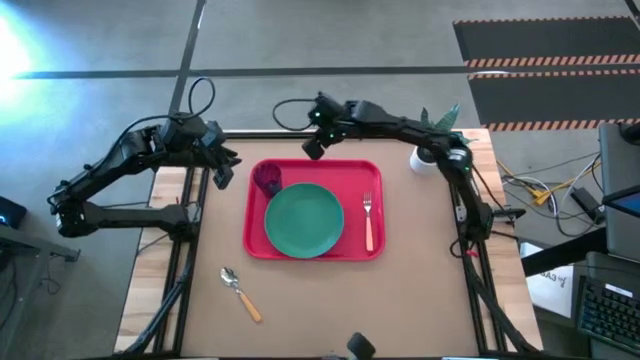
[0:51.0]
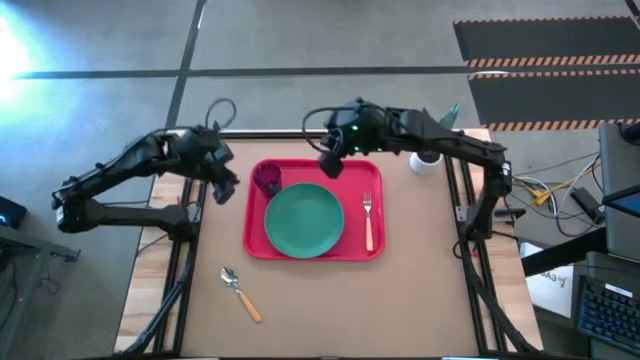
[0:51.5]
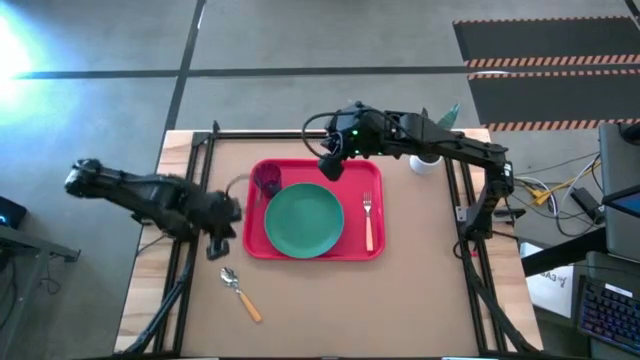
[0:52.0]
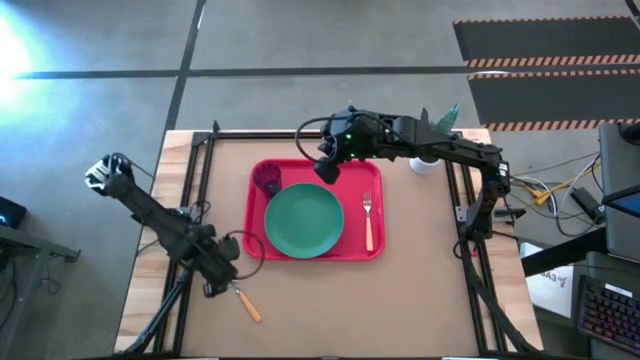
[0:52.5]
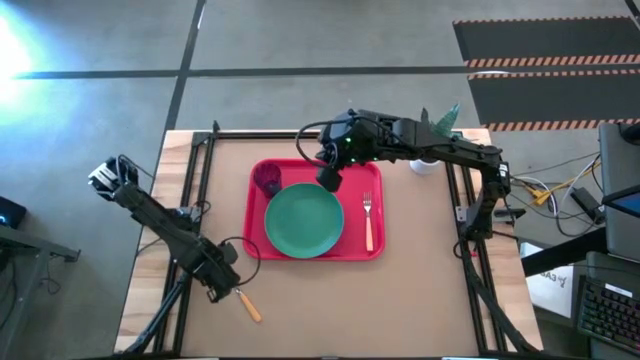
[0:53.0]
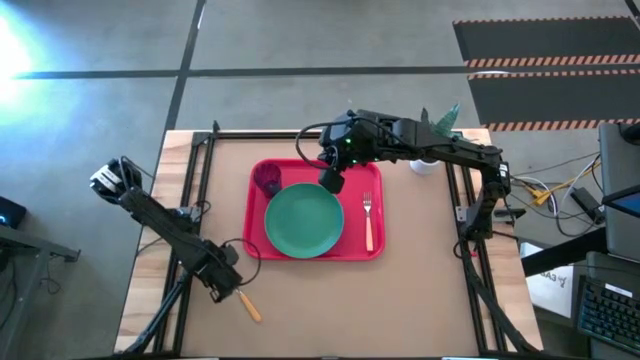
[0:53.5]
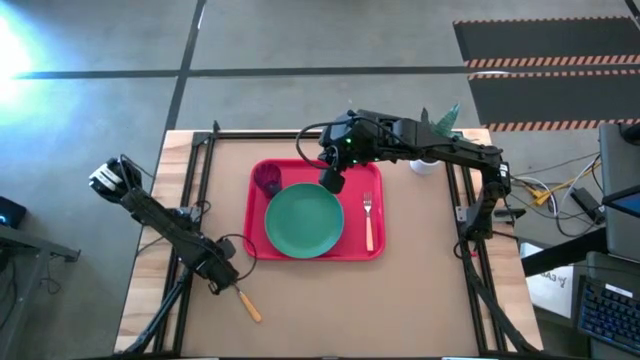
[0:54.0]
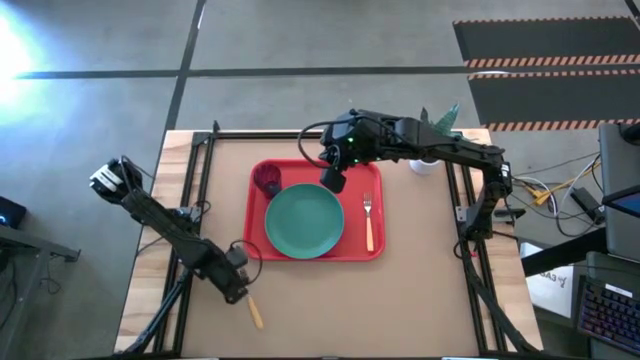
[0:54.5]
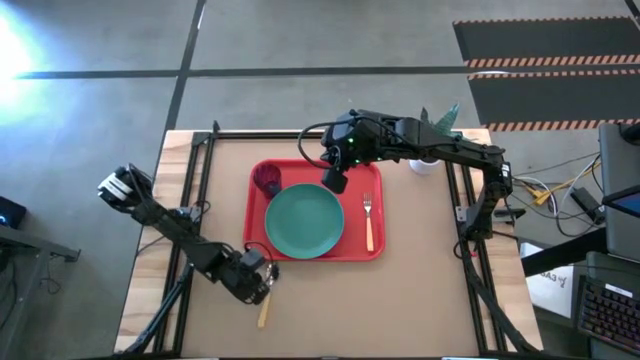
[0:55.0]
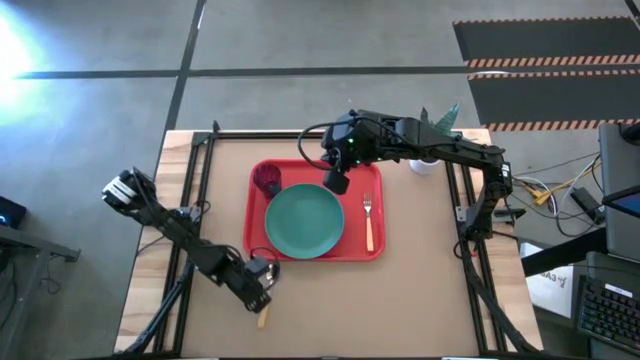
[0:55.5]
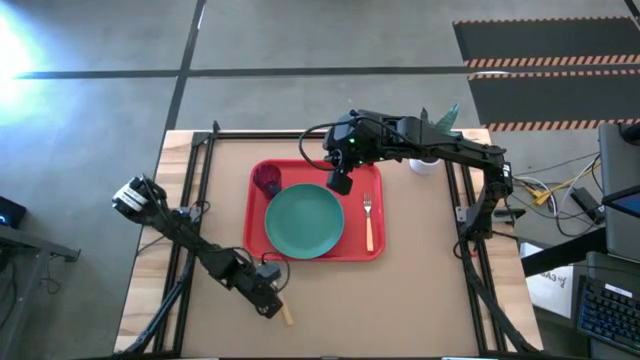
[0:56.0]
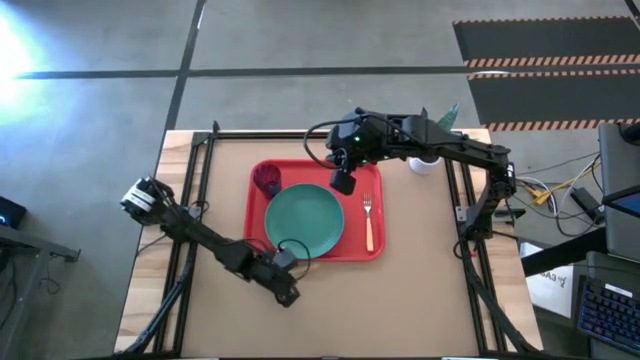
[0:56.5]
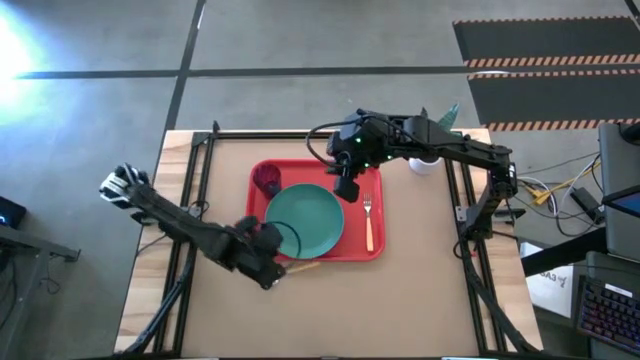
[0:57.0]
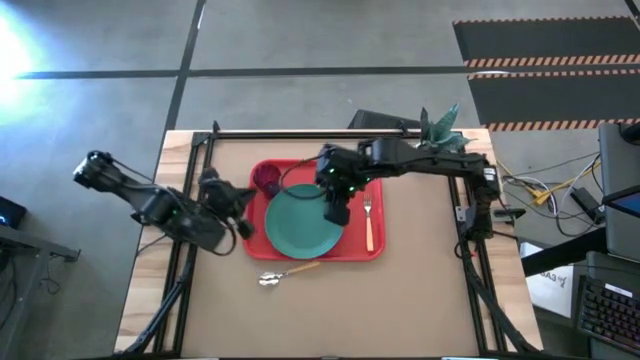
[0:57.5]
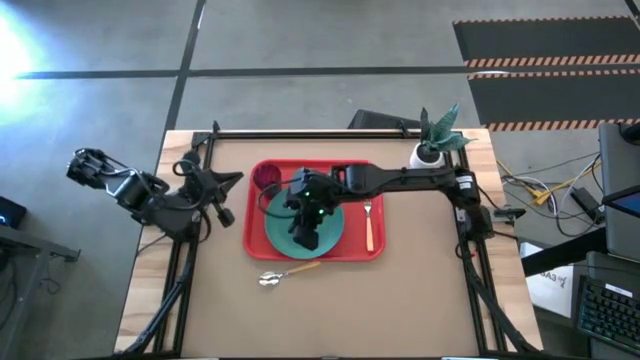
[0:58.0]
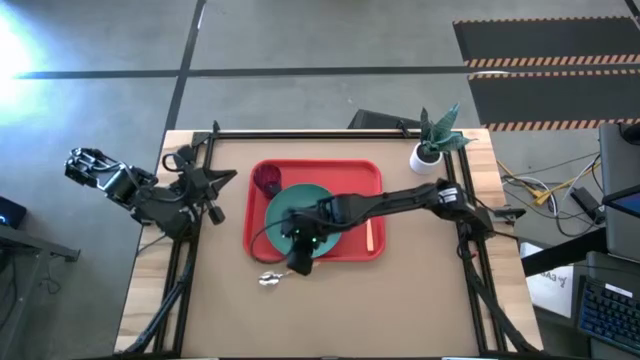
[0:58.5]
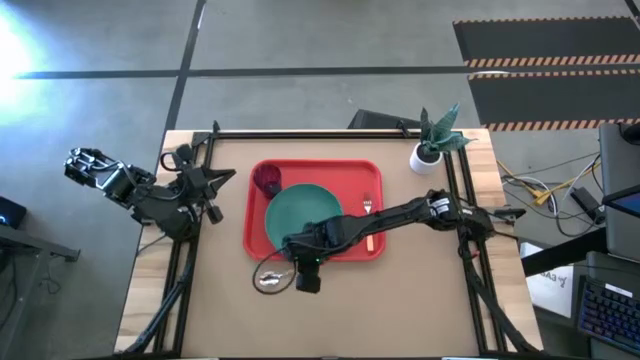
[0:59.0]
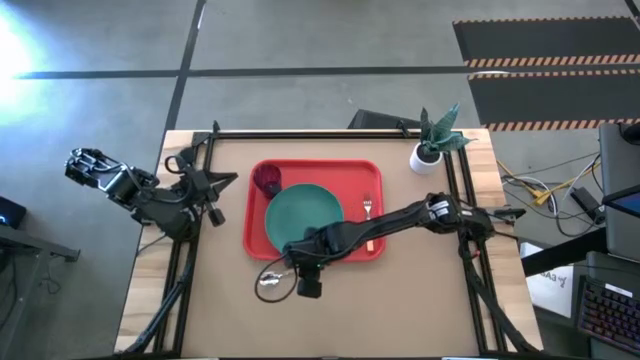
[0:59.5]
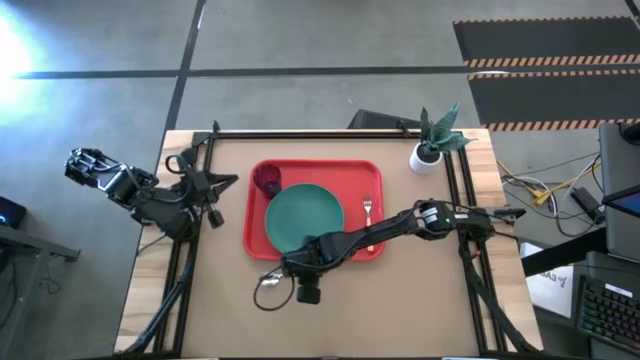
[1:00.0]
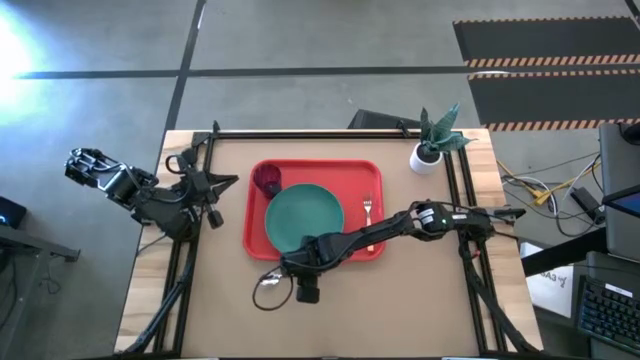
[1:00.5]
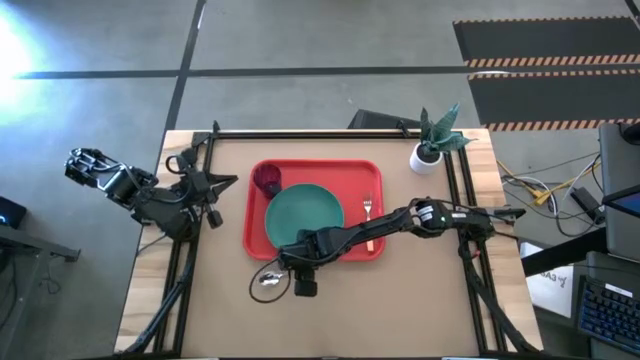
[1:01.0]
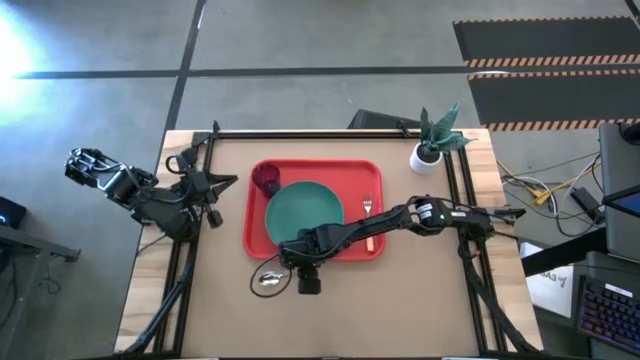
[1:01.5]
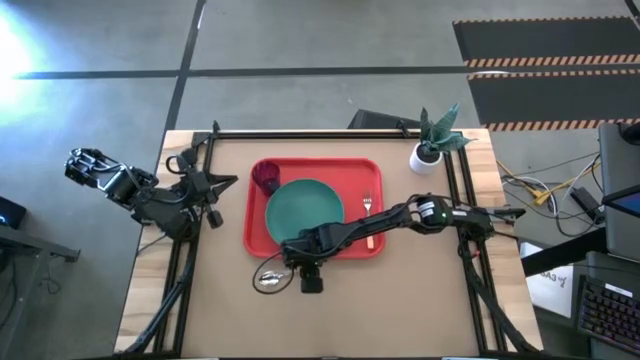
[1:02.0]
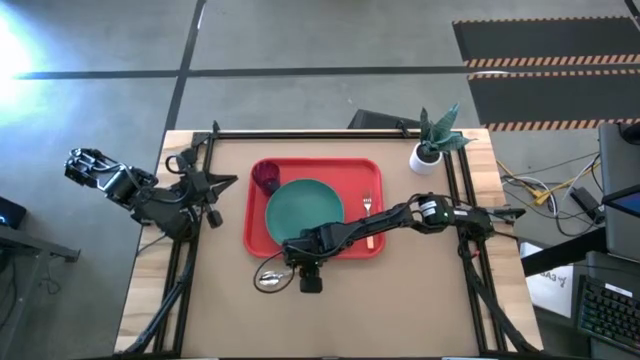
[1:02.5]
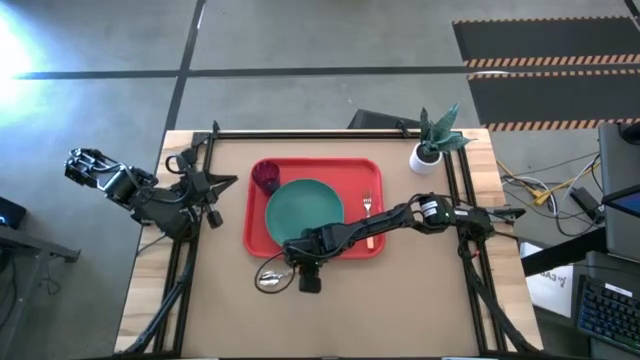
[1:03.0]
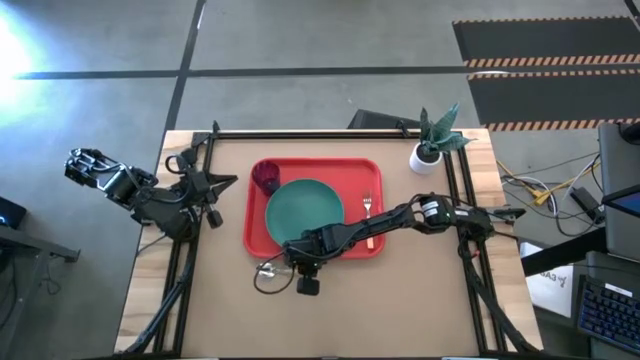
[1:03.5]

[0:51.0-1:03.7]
Task: Pick and place plate/cup/fork/spoon on tray
Put the orange spoon to the left side of the orange fork on the orange tray

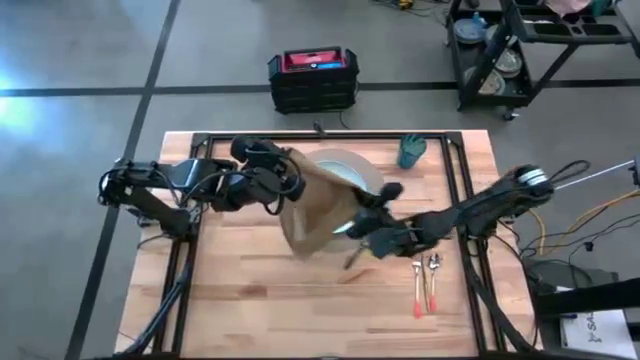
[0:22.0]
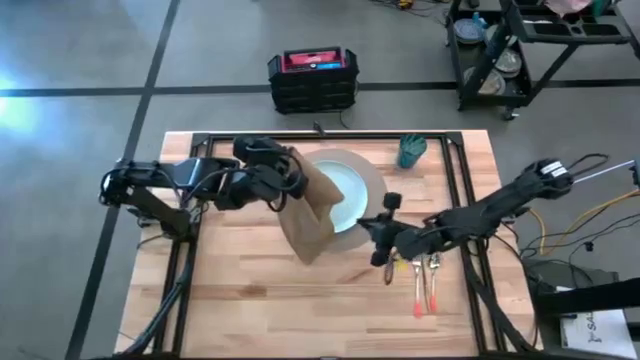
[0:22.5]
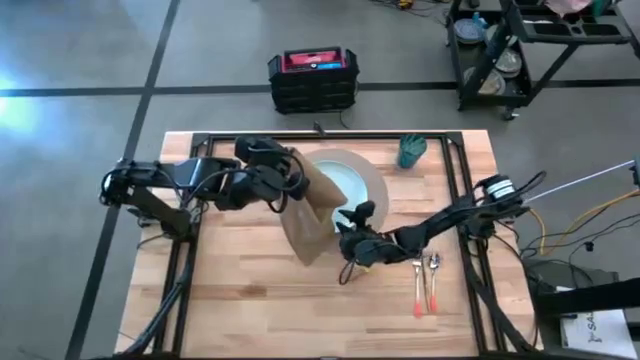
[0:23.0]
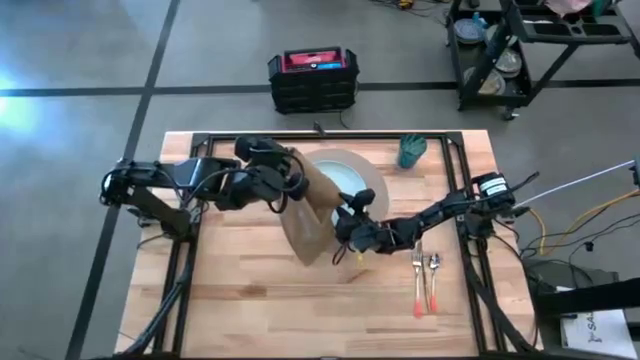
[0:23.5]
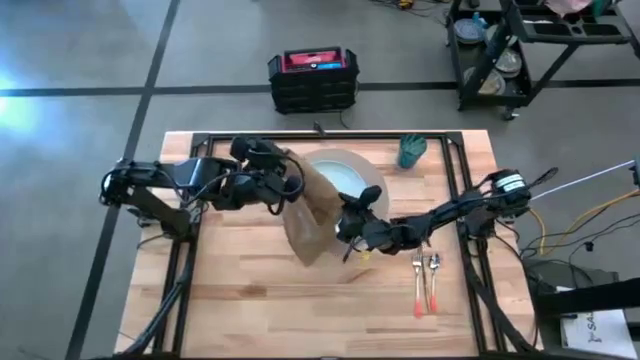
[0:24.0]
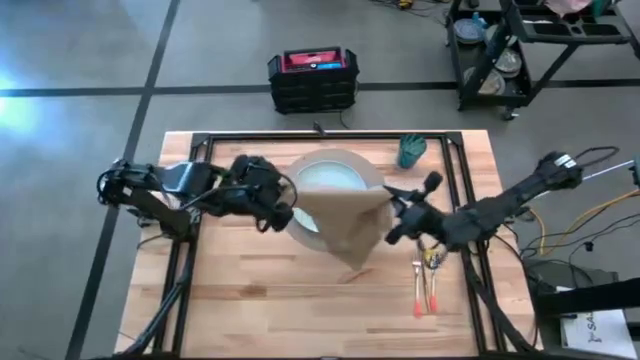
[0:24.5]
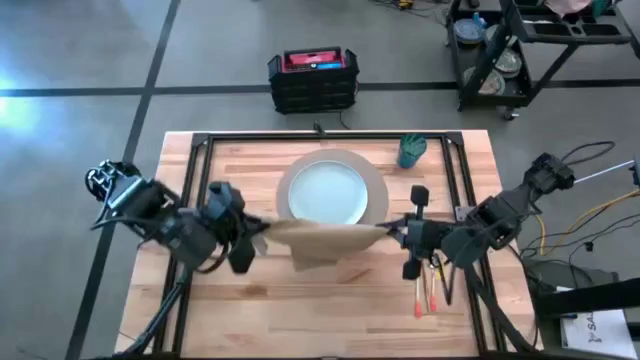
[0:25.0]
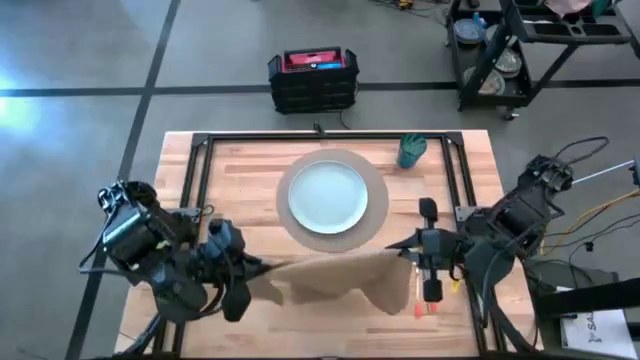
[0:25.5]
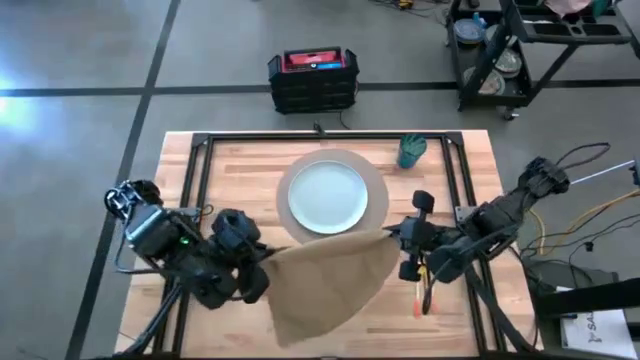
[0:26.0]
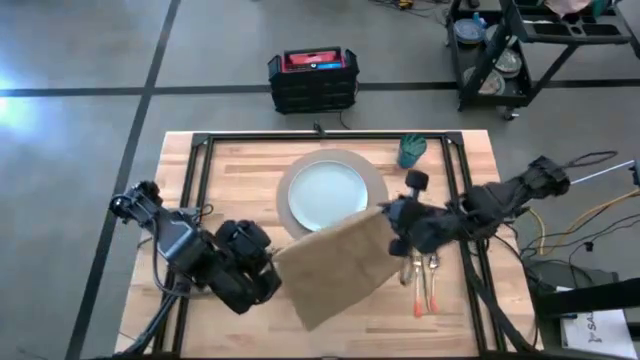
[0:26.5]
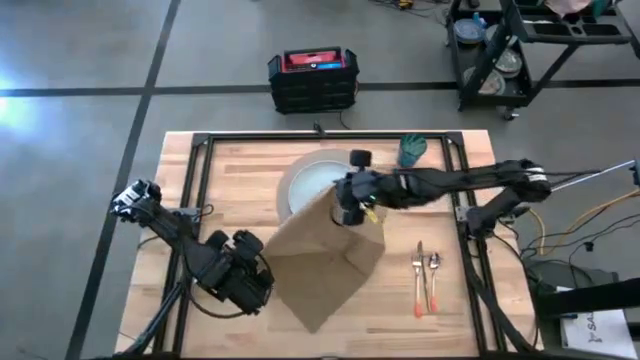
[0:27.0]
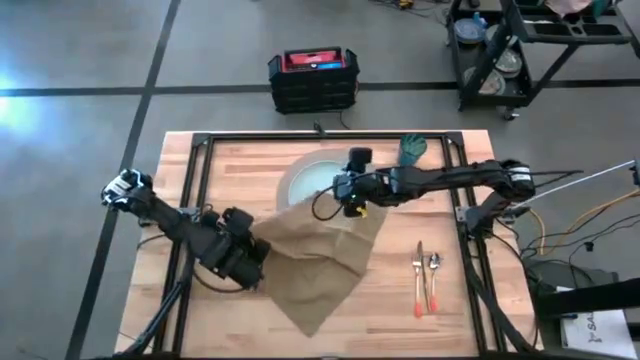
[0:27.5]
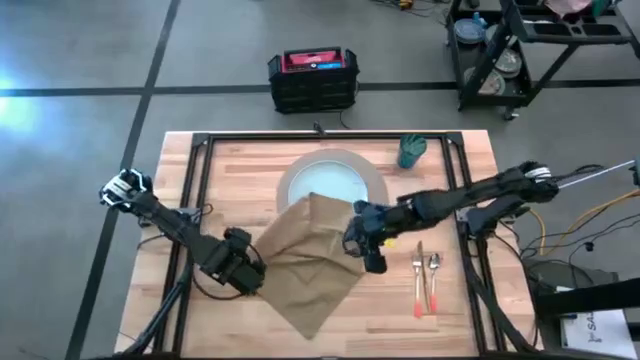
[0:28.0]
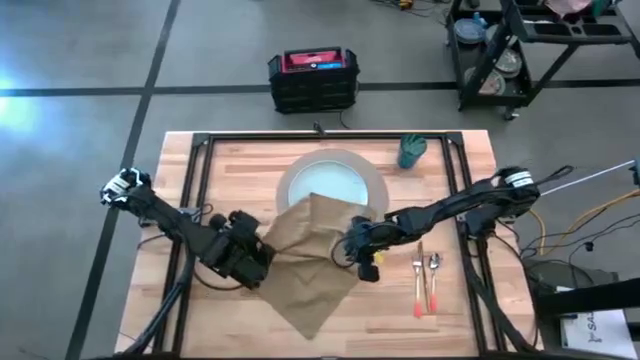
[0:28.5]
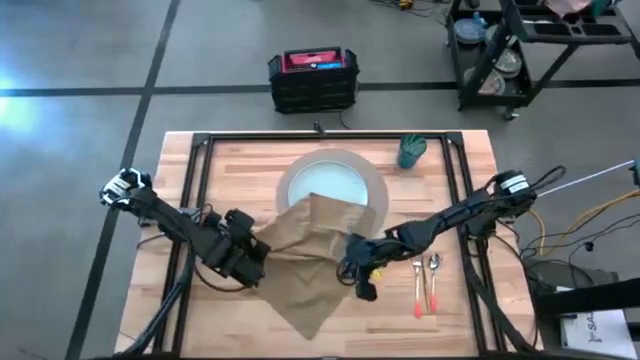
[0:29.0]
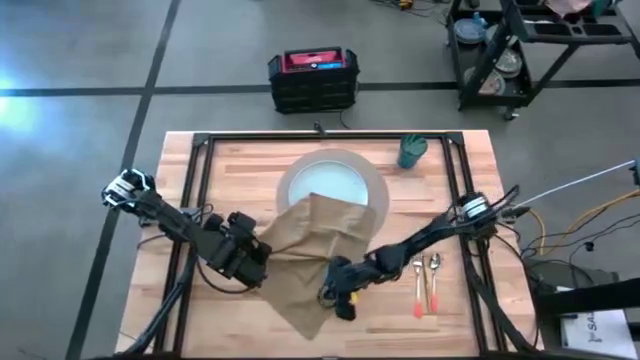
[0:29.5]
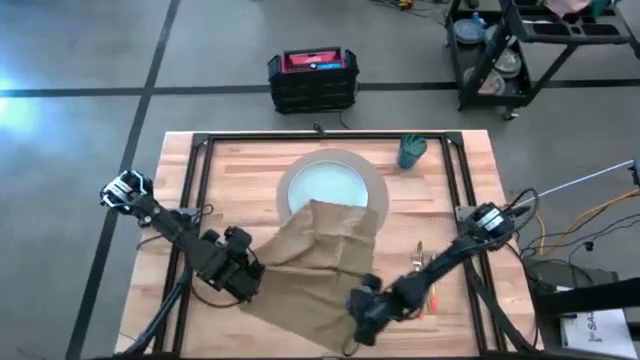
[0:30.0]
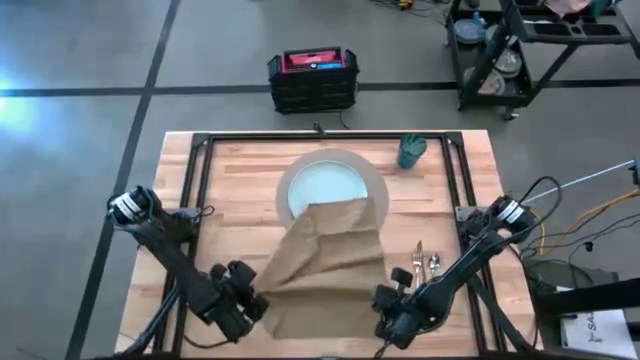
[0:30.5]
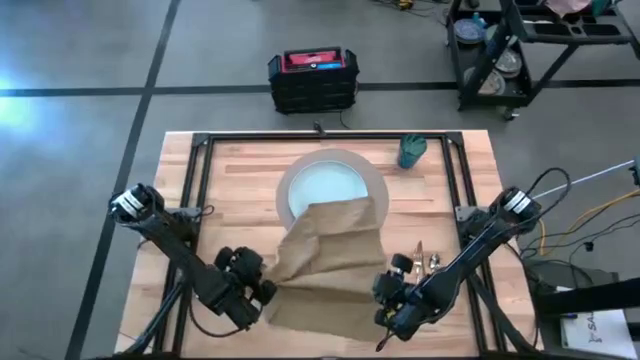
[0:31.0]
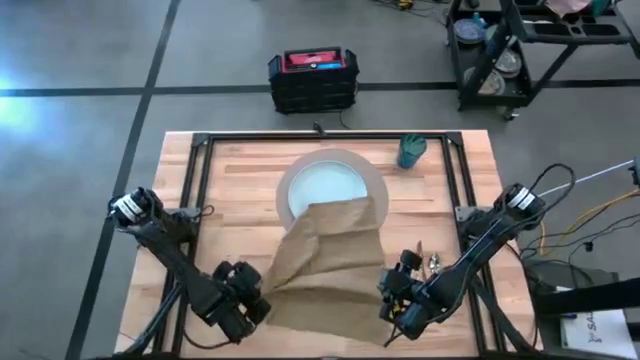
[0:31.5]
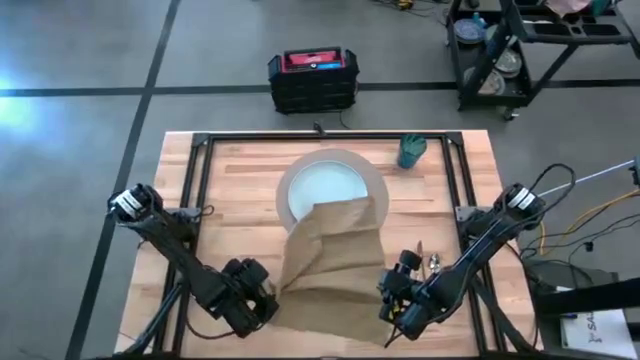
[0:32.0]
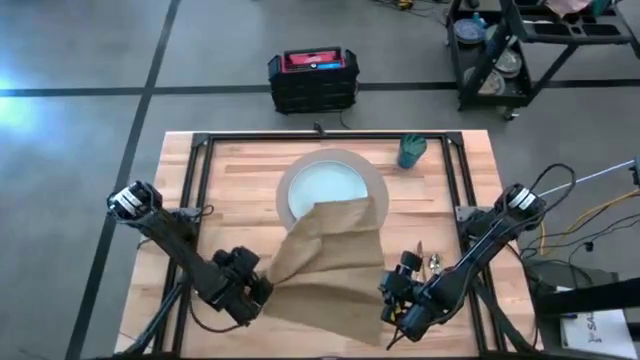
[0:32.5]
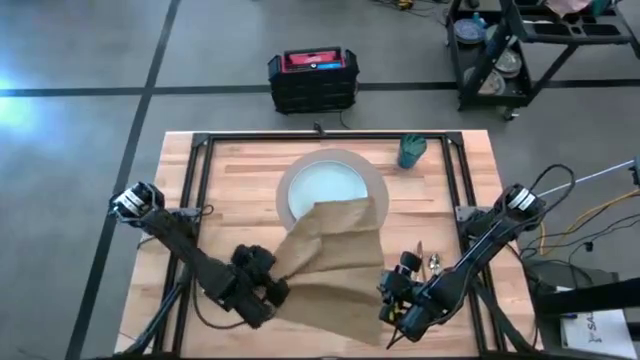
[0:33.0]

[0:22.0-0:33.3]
Task: Set table place
Fold the brown table napkin
